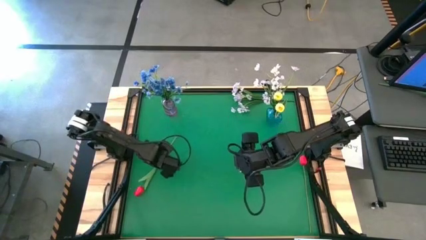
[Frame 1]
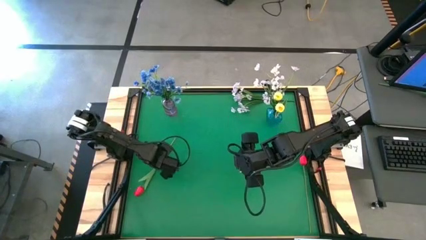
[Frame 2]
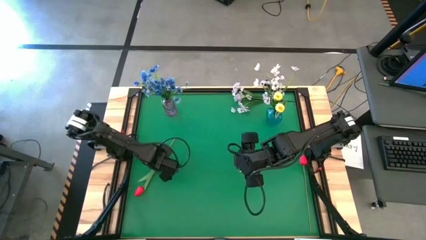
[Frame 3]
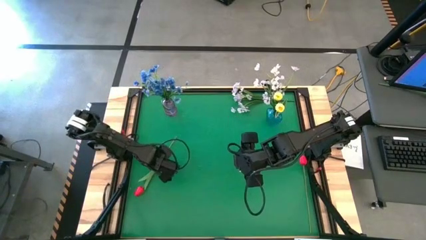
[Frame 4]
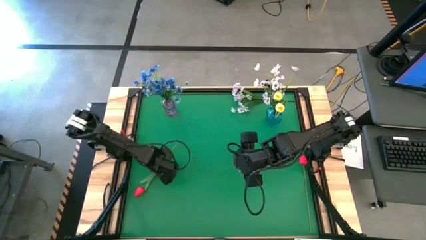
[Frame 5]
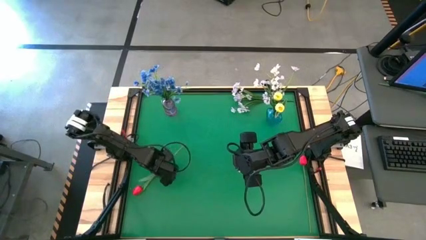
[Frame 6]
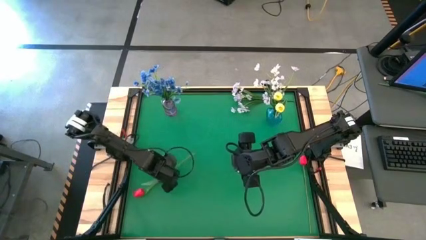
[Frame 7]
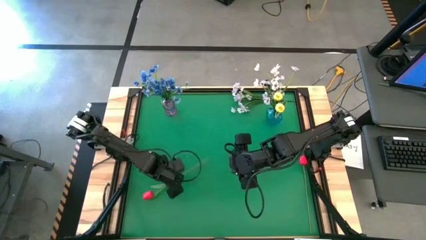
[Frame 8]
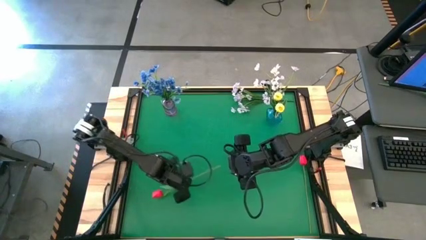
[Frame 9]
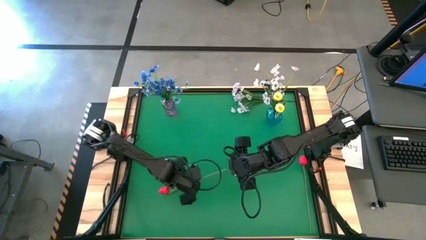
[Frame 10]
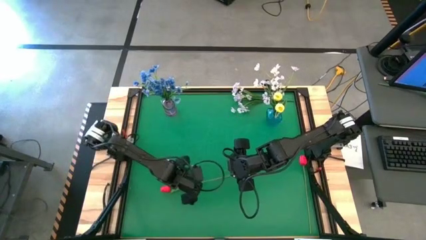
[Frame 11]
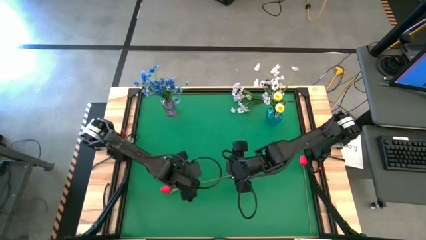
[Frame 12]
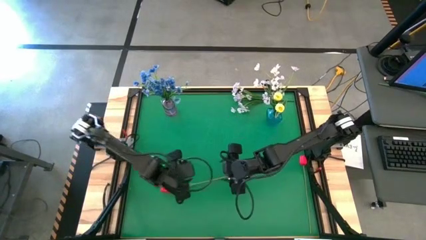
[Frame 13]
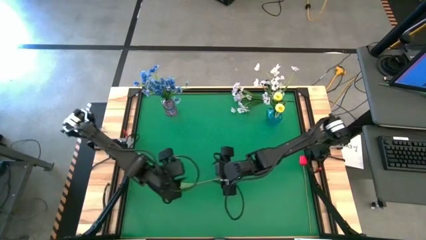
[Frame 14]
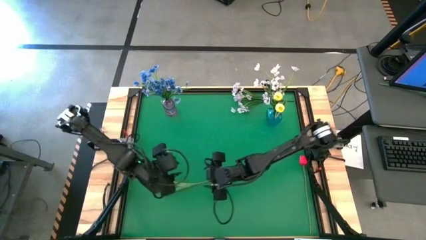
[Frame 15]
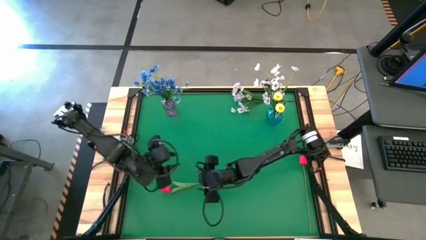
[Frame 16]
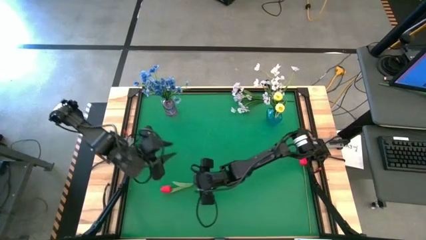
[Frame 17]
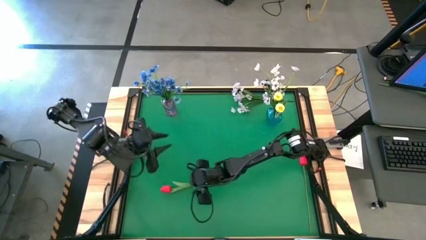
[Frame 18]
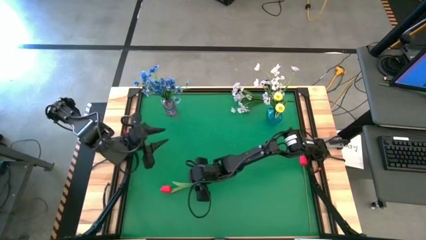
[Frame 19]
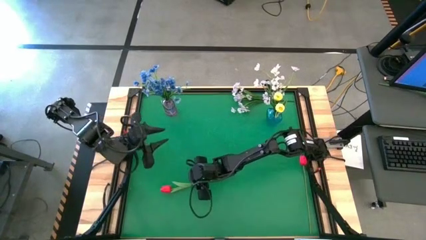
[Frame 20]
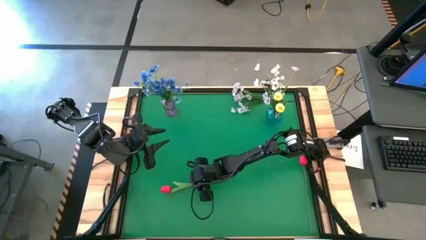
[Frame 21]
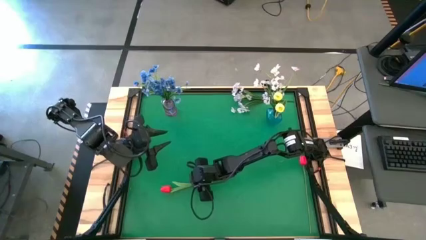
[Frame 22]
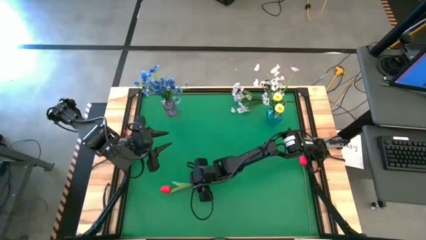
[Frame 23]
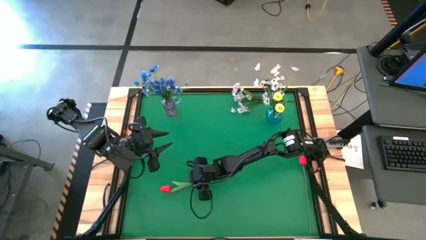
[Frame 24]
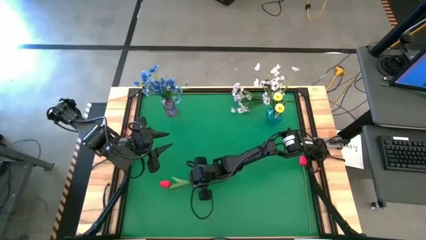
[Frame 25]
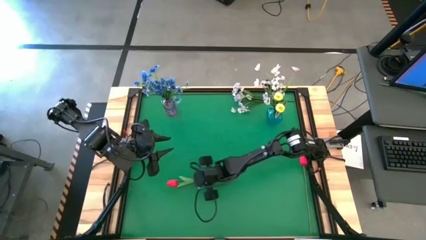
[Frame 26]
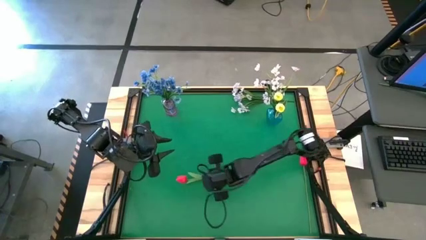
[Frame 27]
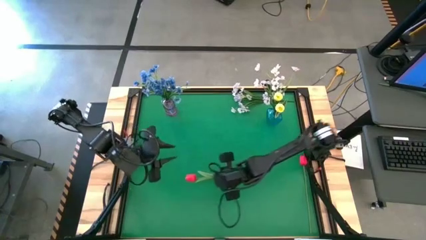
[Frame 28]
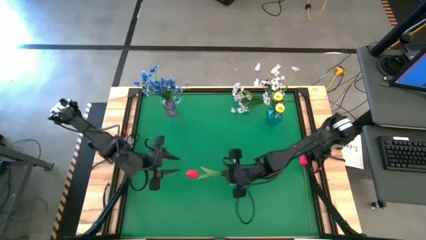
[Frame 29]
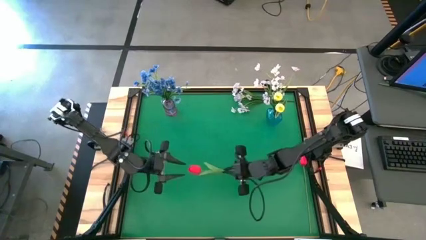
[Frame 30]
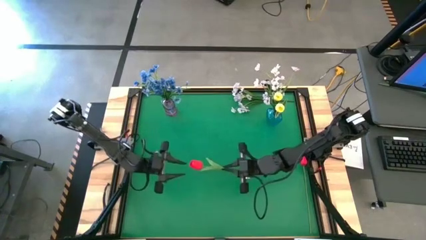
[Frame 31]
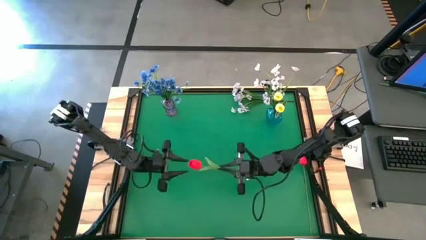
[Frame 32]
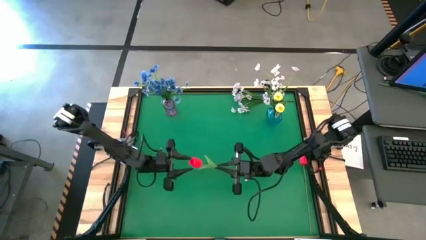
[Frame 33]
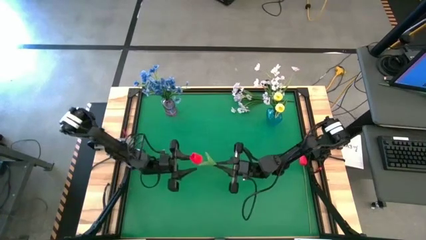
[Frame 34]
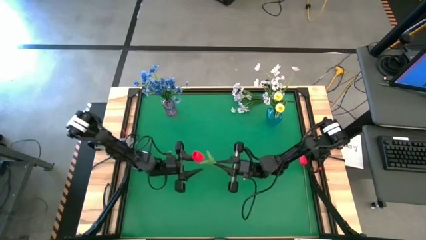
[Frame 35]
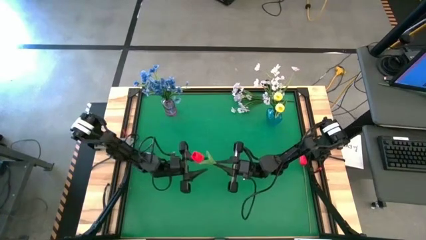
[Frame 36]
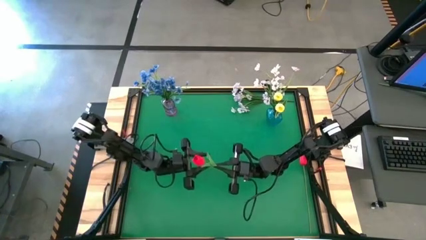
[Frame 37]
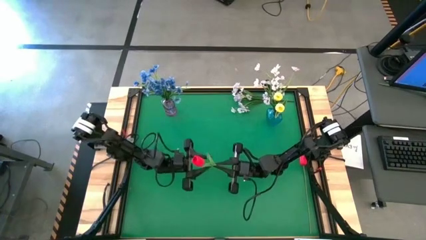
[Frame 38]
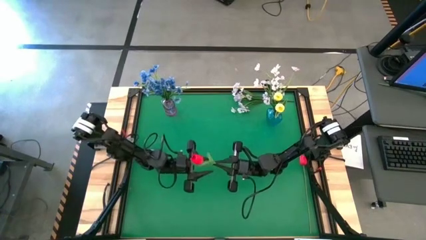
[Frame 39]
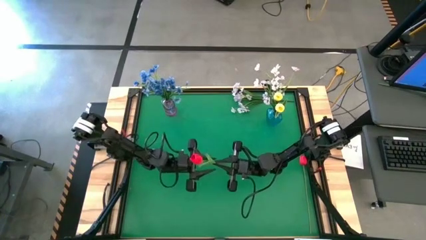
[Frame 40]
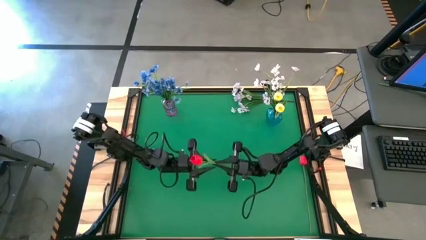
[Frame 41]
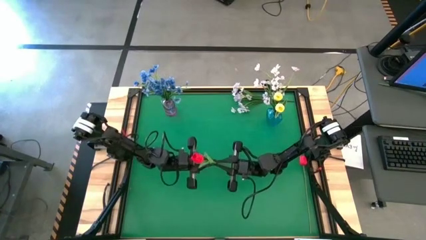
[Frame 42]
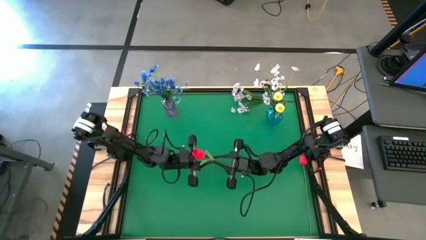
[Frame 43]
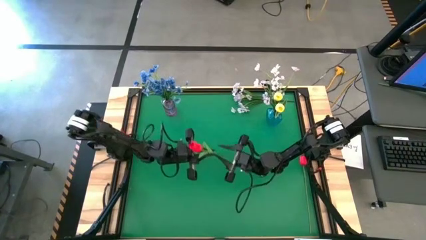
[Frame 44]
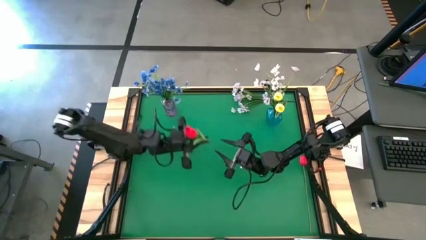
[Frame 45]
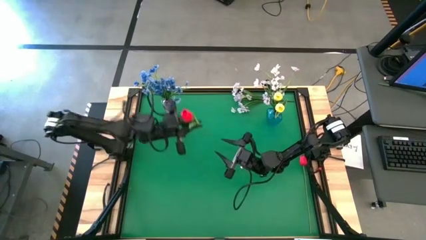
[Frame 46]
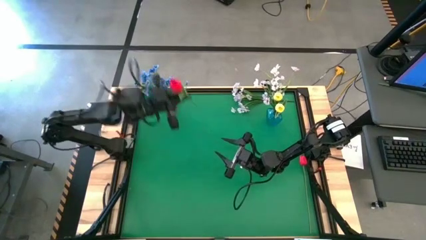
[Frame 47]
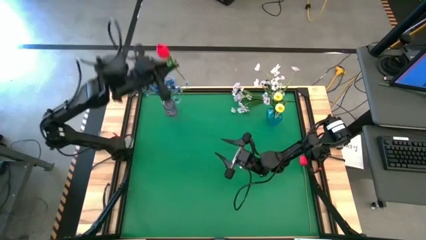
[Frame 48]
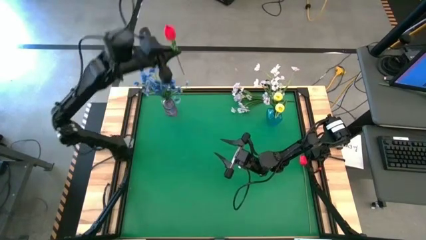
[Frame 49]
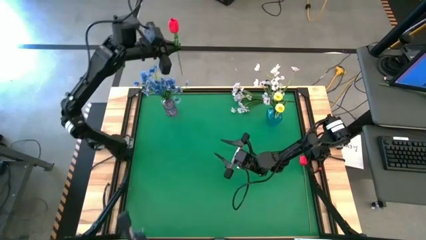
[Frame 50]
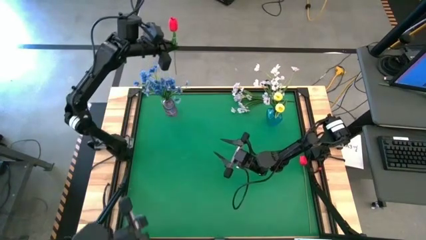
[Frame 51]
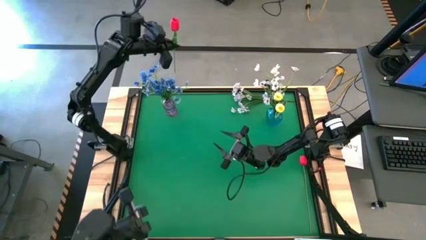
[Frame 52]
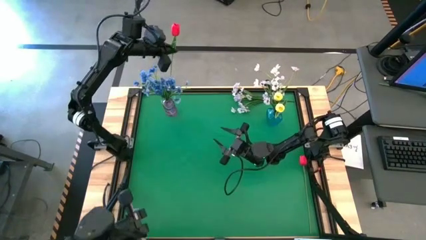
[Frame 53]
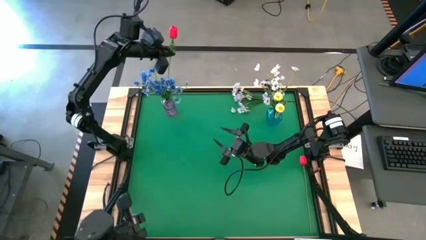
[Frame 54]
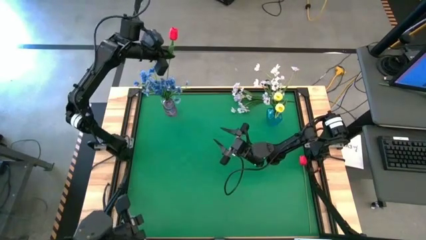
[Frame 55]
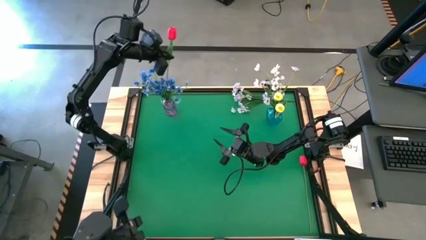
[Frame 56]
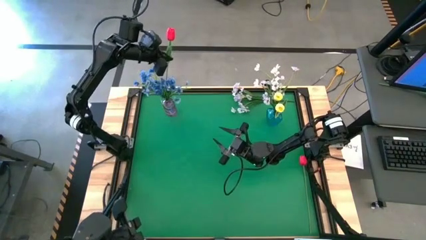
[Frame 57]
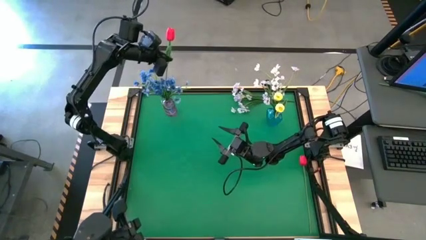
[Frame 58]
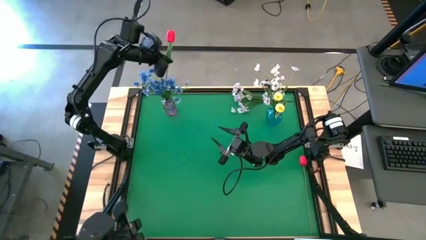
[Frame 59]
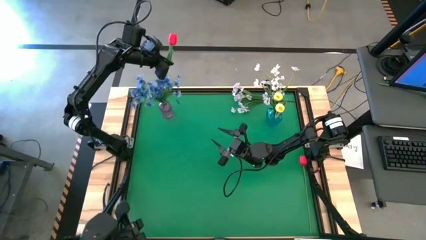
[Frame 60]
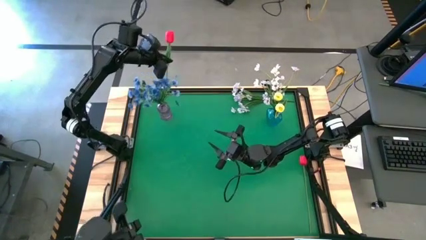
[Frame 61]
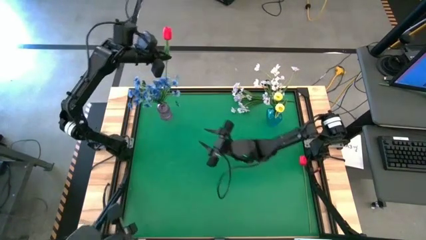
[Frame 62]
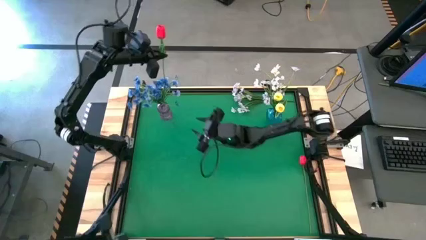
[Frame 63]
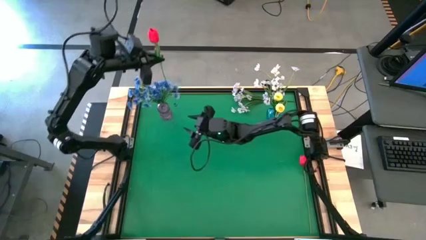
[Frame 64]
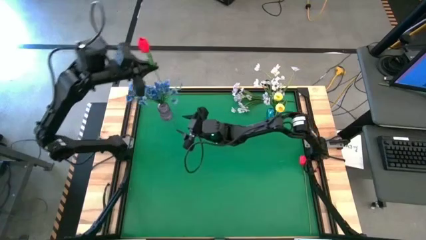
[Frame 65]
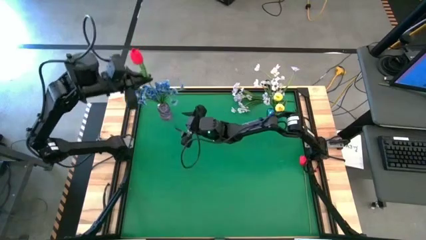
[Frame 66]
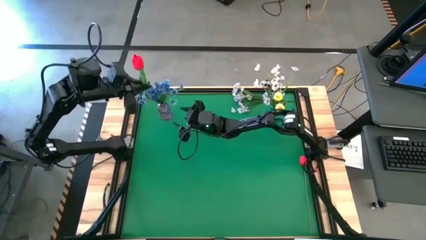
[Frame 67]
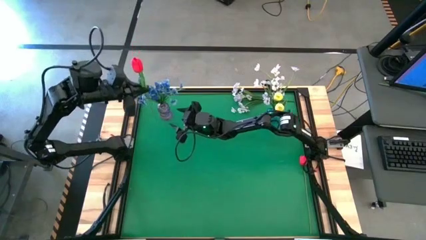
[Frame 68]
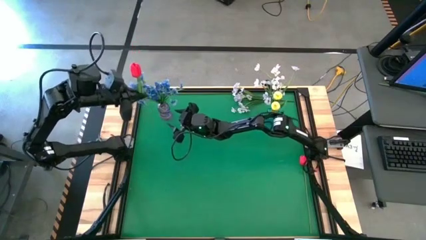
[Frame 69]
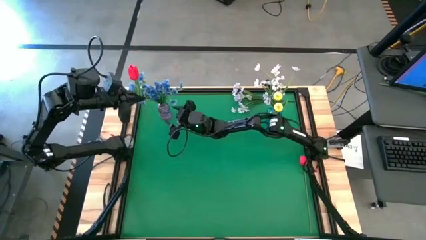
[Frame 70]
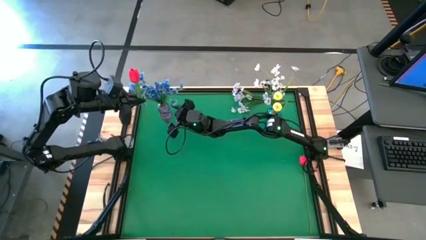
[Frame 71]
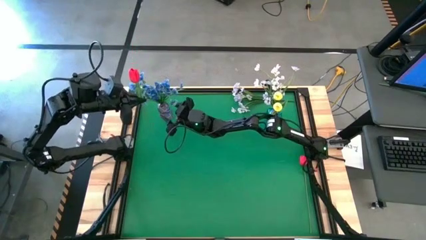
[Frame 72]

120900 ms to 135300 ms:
Task: Sort flowers into vase by color
Put the left red tulip into the purple vase
